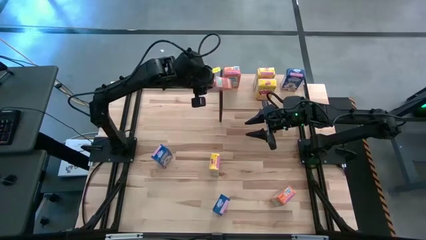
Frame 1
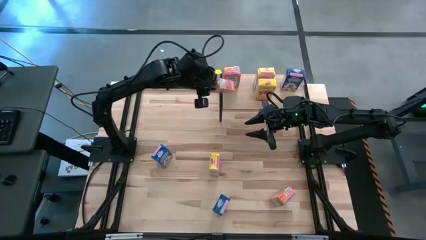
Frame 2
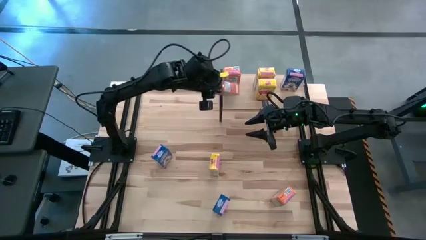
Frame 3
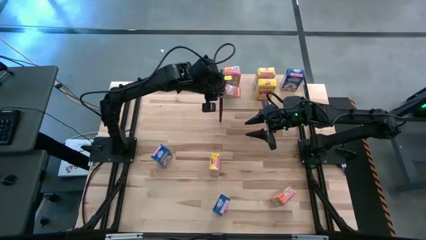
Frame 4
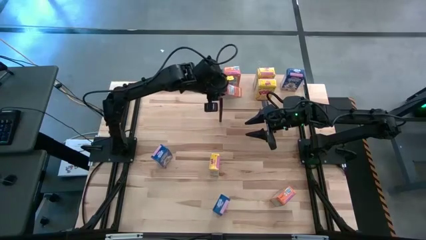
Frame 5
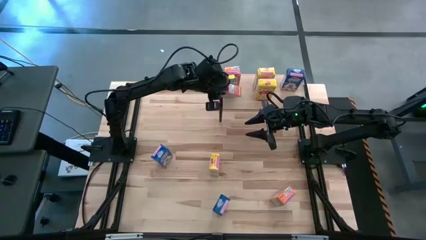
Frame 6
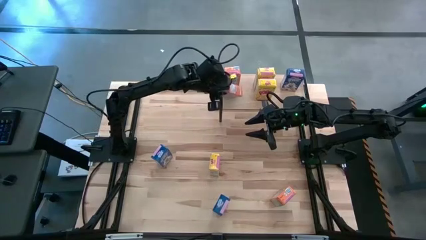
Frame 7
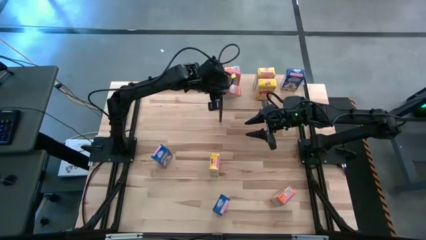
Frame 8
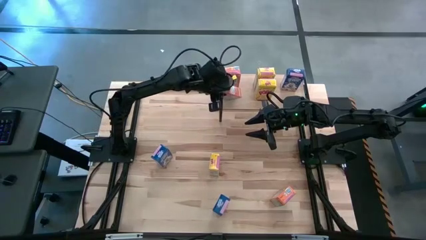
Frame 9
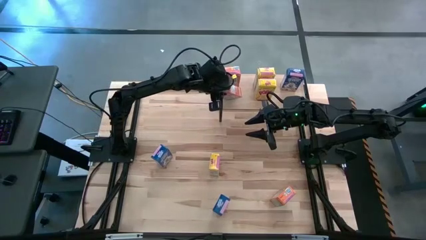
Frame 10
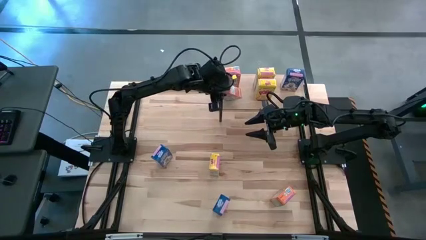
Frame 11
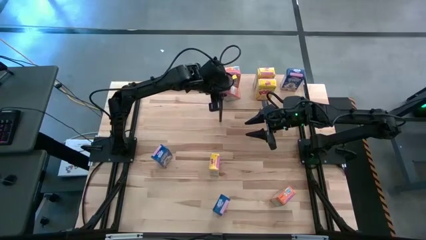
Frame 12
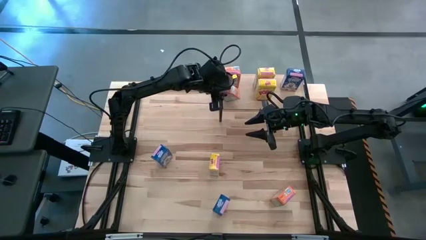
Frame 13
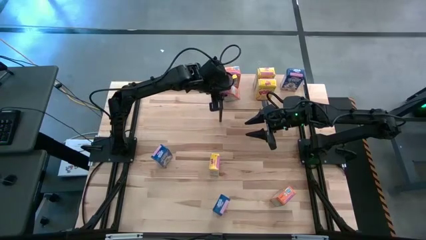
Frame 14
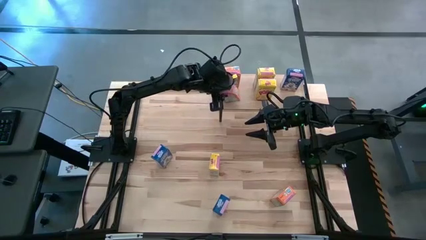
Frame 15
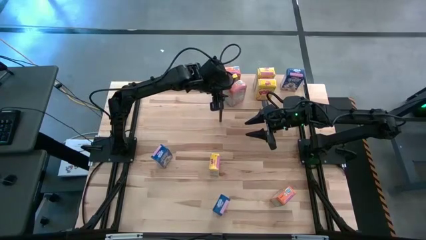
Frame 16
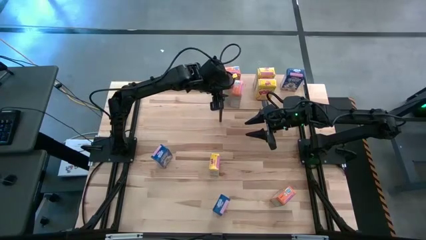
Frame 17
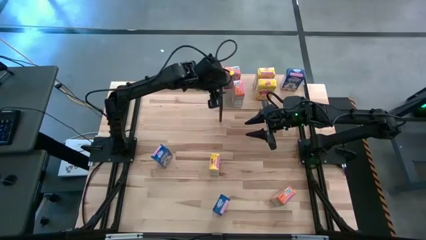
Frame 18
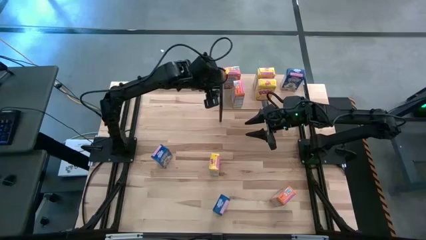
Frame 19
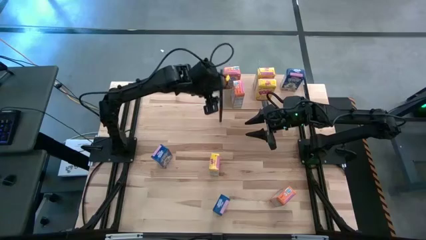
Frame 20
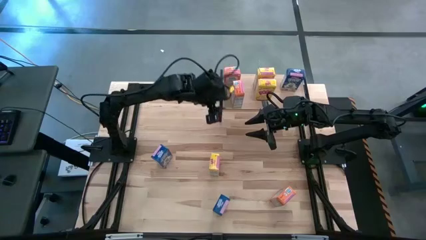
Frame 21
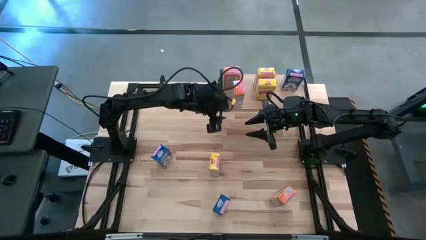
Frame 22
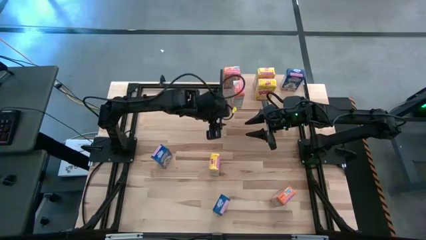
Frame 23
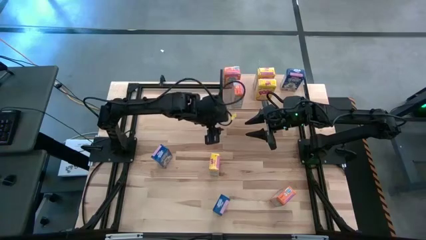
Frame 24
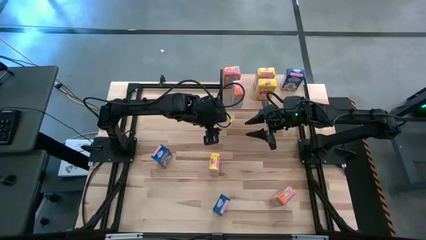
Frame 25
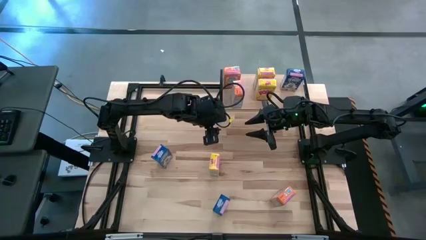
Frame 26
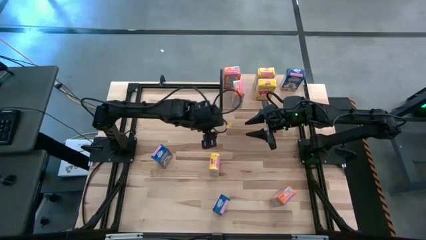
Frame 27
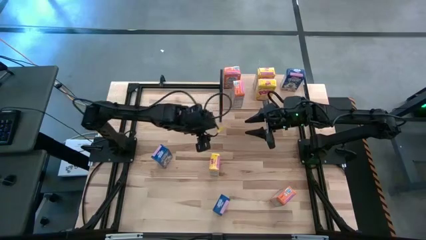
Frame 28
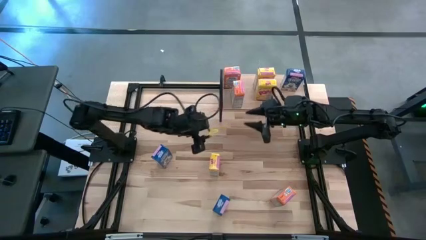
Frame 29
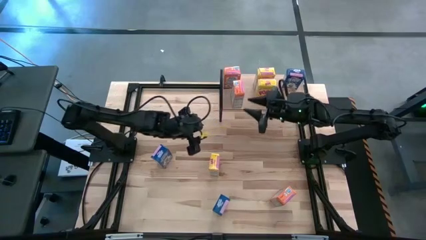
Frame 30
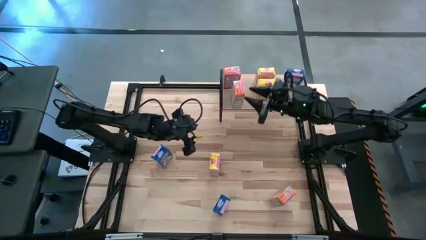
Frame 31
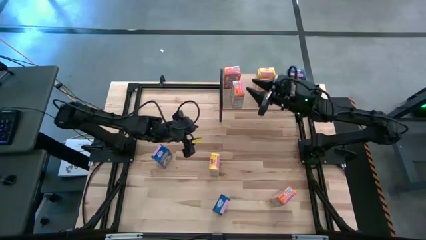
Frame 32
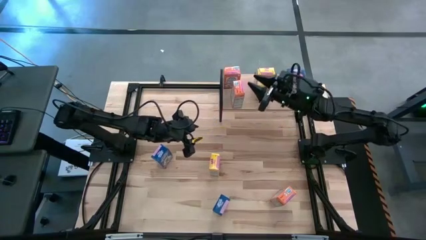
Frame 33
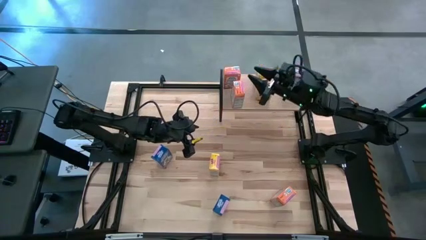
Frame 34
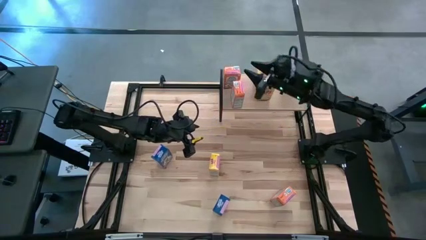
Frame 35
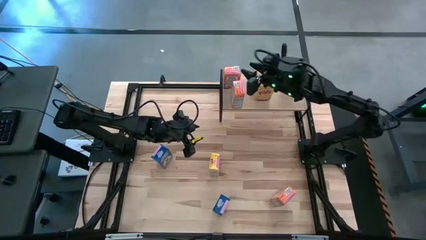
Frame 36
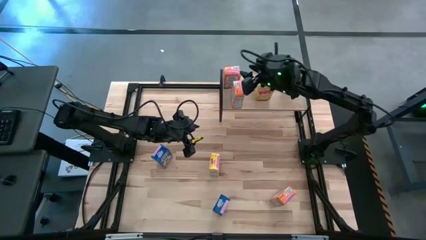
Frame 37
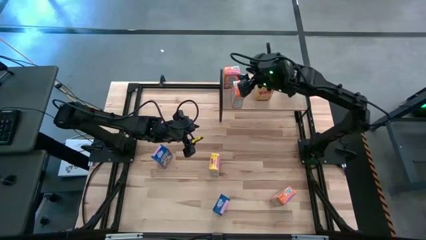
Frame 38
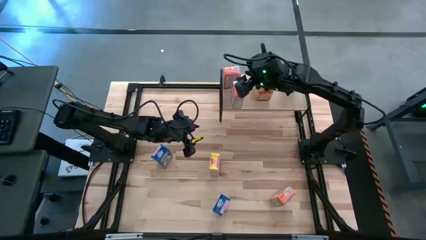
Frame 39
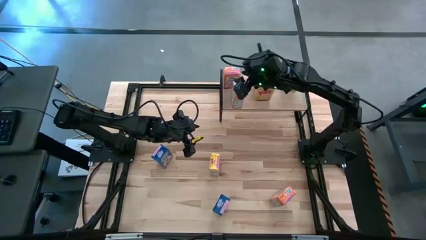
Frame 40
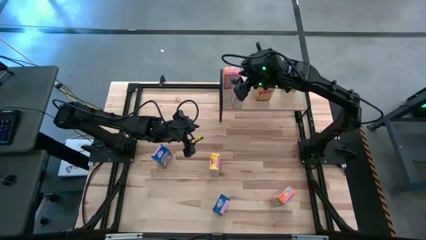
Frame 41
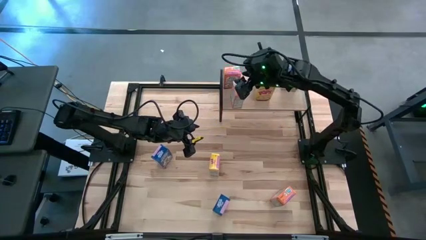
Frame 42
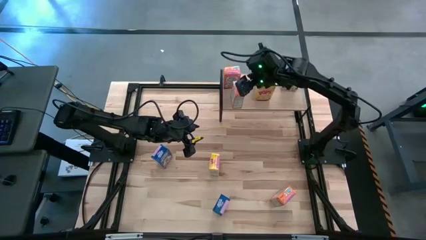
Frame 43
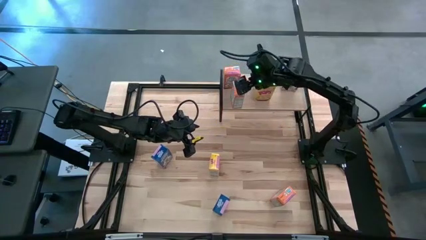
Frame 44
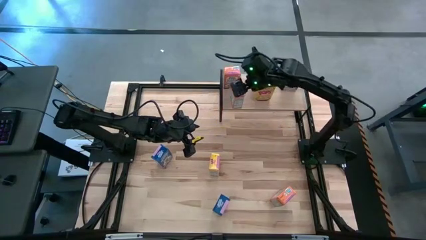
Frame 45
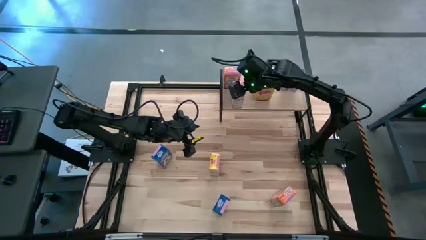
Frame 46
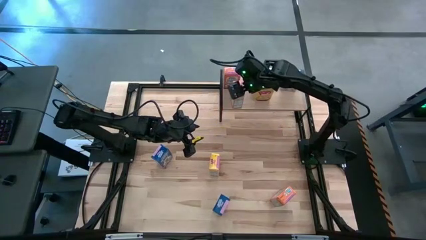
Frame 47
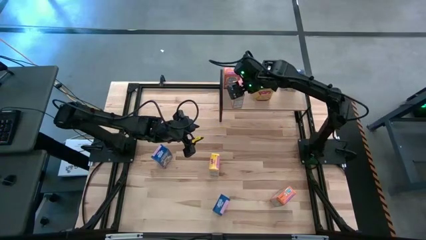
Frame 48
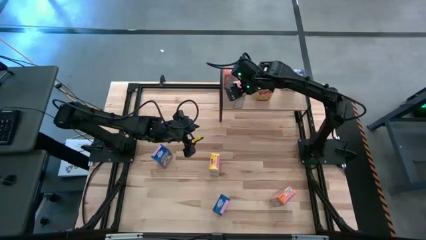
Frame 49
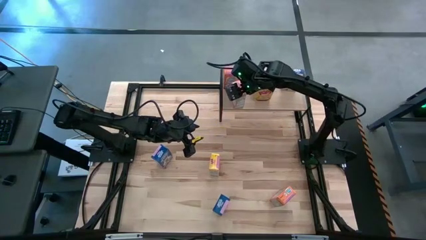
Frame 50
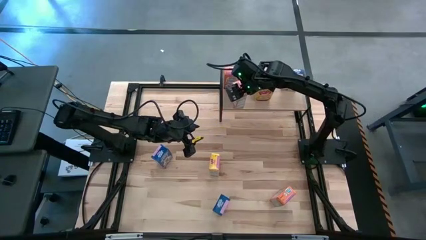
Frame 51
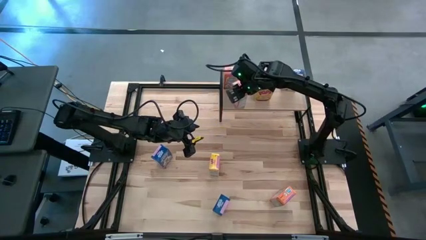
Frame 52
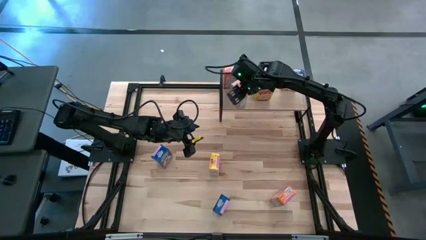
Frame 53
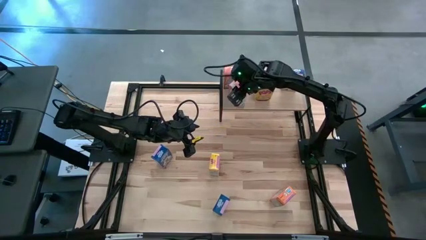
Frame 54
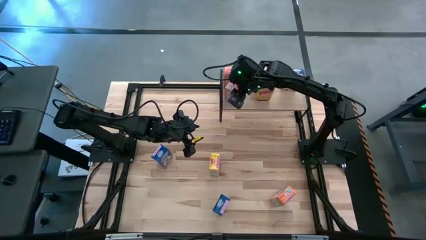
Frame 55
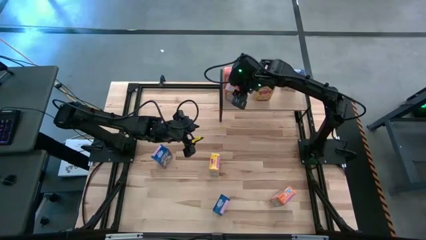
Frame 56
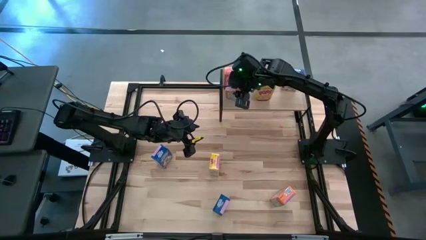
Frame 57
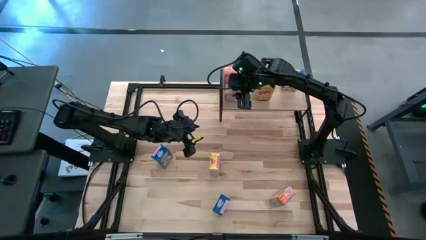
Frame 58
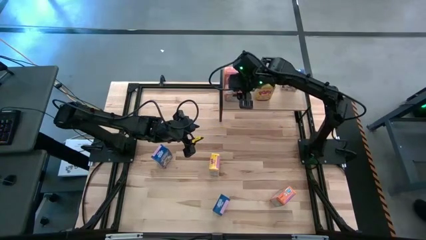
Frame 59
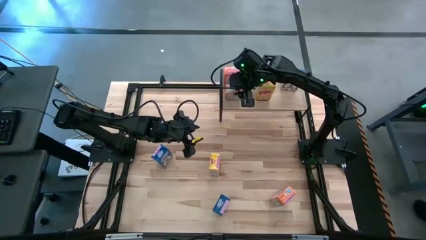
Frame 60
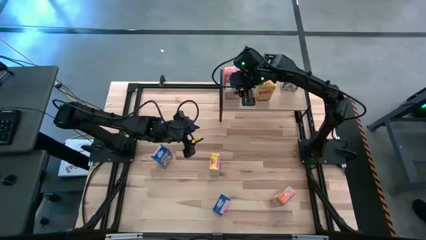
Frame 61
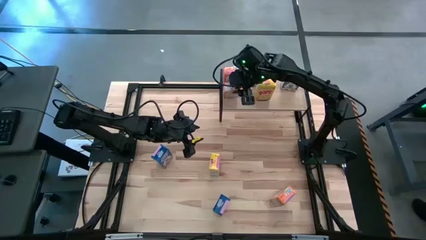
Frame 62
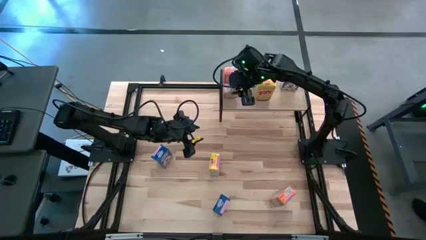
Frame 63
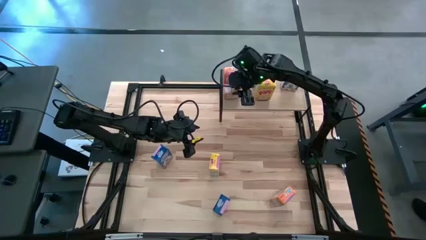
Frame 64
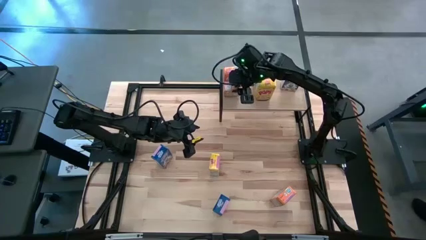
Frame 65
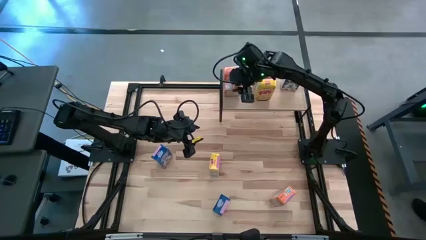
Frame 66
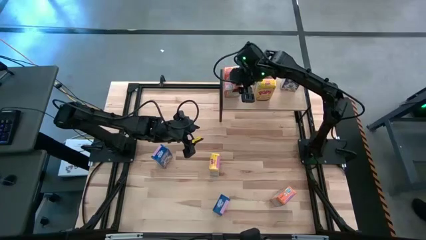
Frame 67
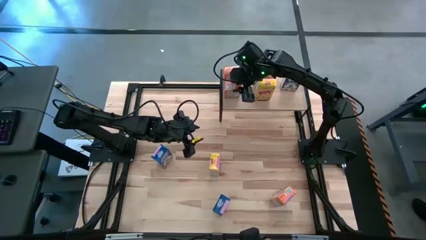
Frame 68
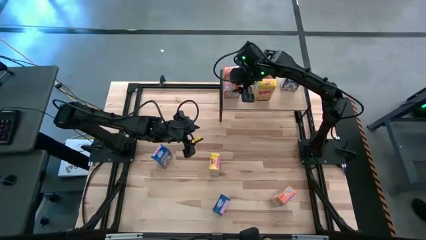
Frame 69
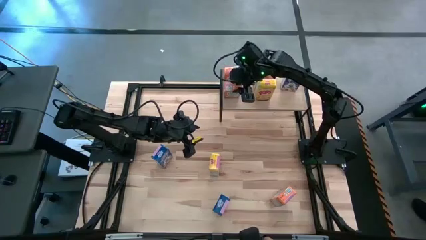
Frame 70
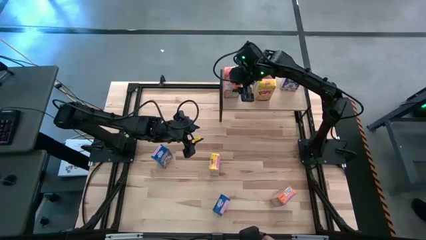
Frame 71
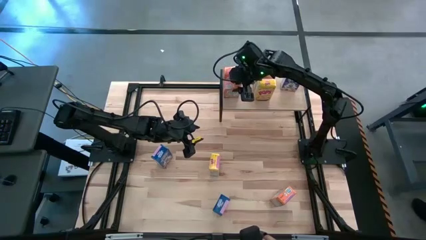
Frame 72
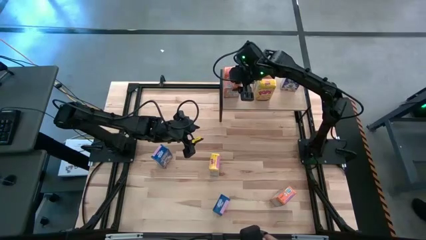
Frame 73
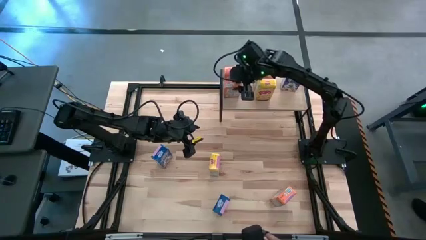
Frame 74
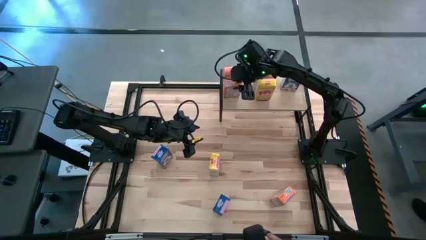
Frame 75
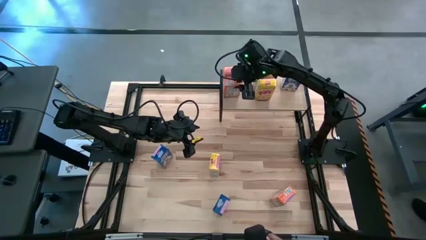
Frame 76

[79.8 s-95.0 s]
Task: Stack cereal on shelf
Put the left orange cereal box on the shelf aligned with the orange cereal box

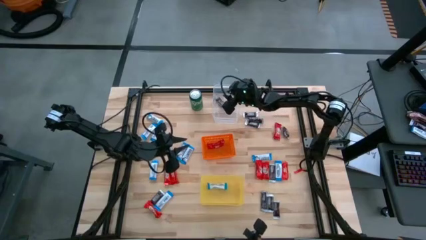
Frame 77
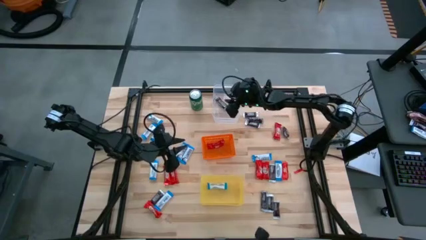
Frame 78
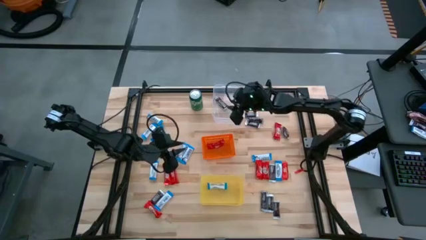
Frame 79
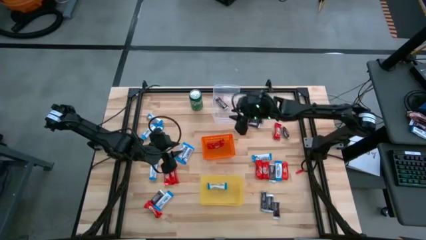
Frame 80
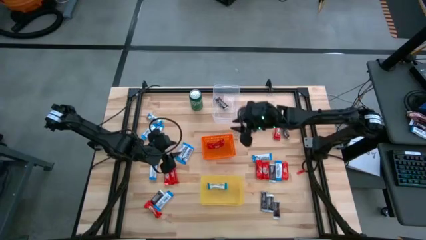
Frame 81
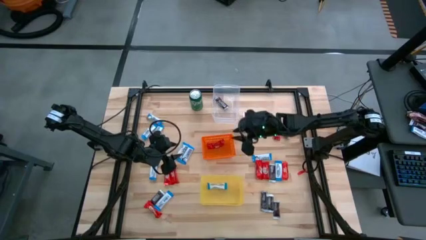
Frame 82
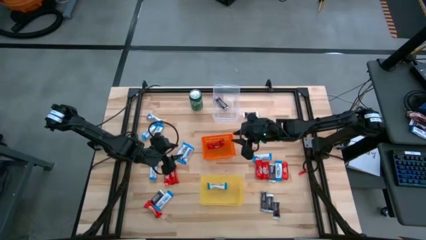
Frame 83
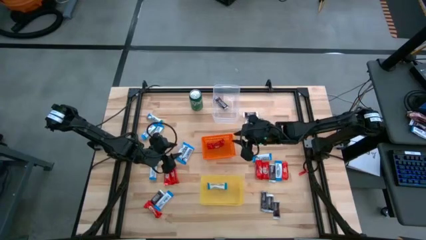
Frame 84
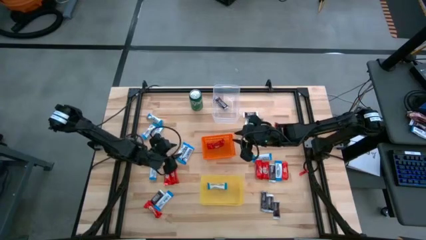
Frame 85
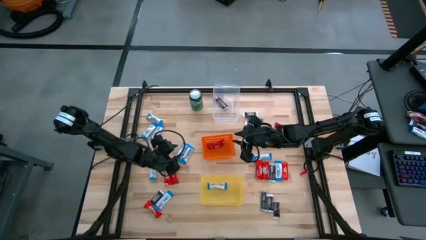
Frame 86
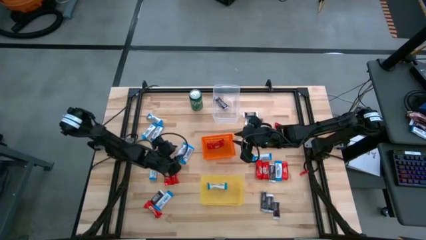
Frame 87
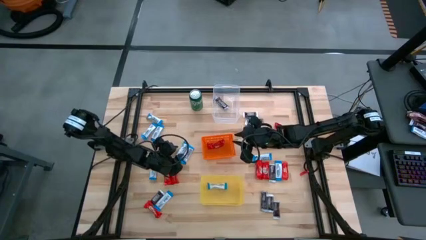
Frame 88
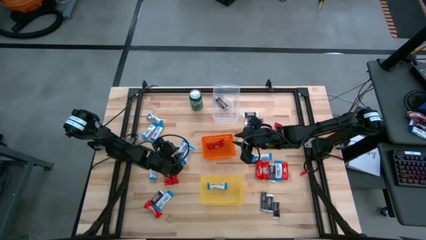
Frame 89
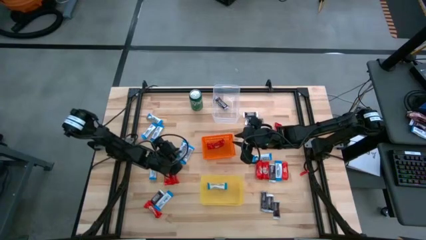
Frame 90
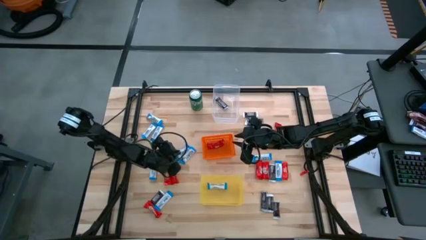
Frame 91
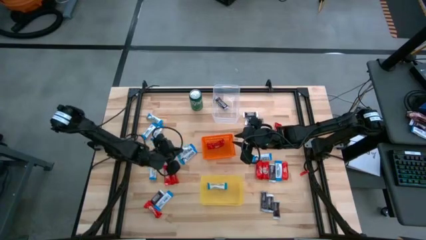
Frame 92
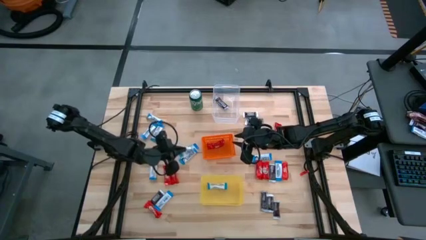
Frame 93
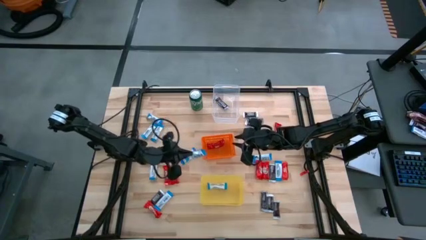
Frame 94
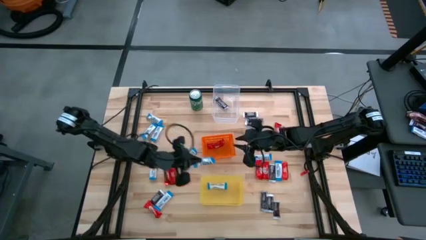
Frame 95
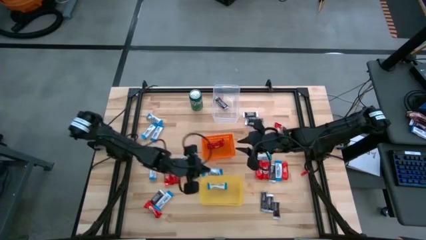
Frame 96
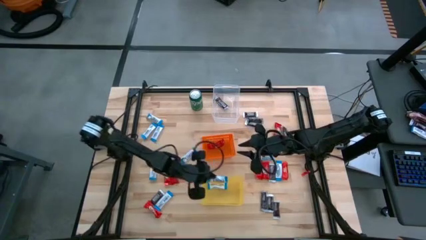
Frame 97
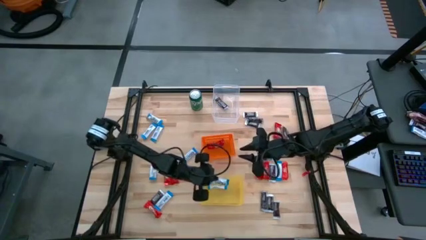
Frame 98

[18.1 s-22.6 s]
Task: Sort candy
Put the white candy into the yellow bin
